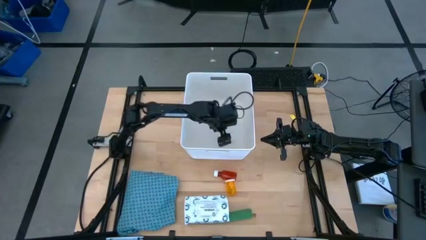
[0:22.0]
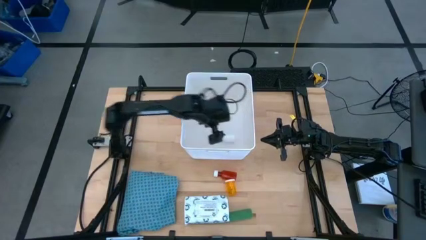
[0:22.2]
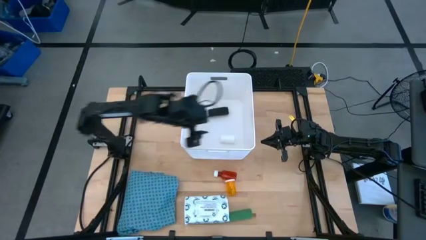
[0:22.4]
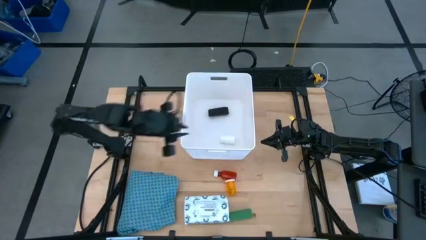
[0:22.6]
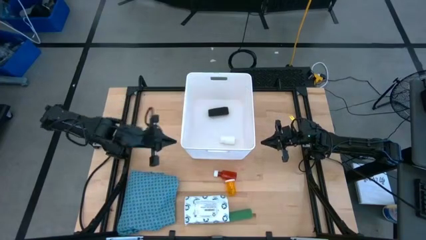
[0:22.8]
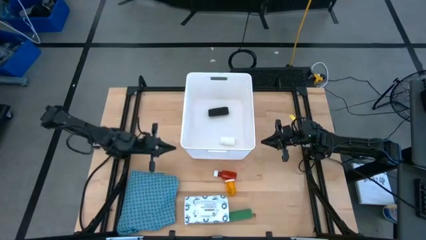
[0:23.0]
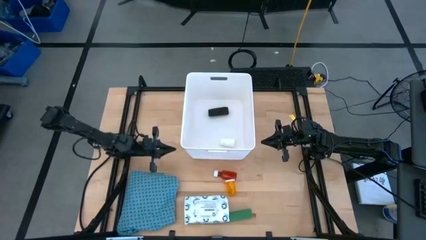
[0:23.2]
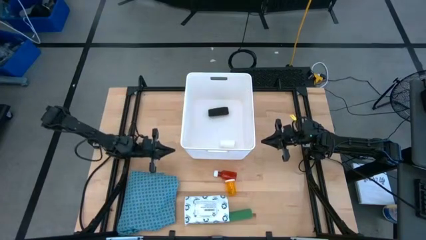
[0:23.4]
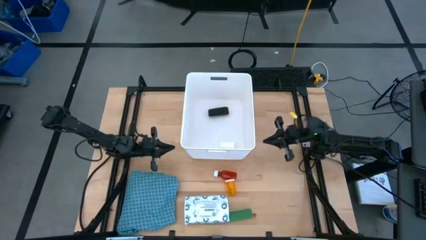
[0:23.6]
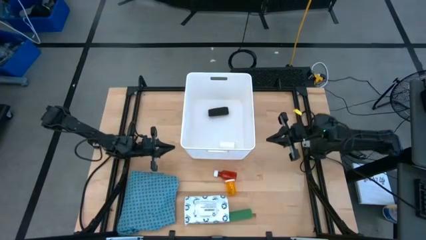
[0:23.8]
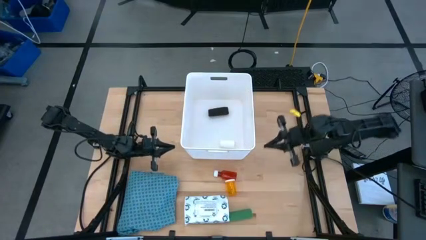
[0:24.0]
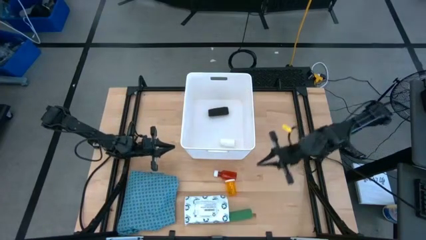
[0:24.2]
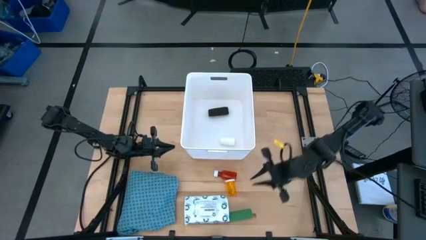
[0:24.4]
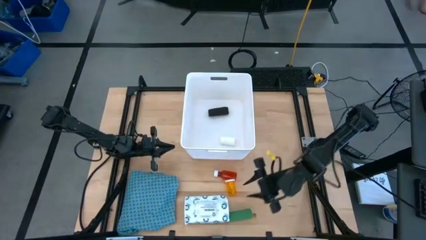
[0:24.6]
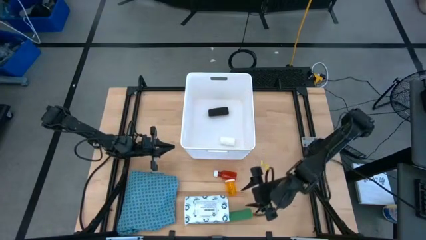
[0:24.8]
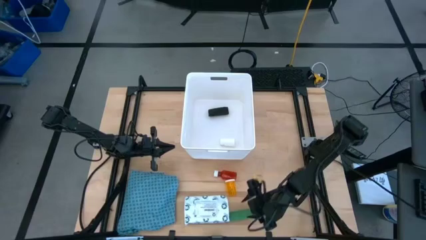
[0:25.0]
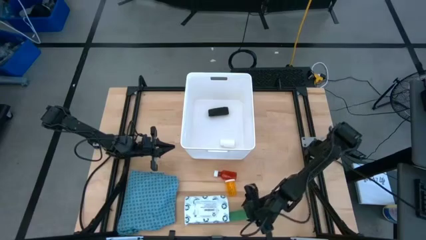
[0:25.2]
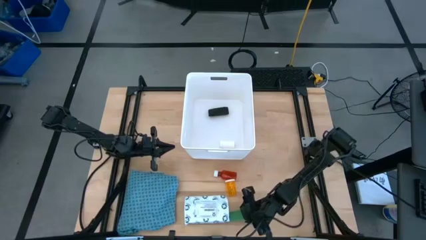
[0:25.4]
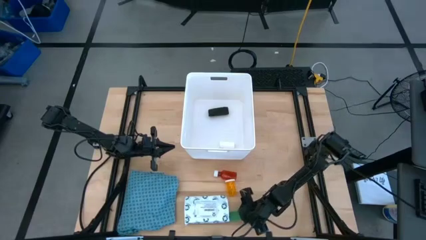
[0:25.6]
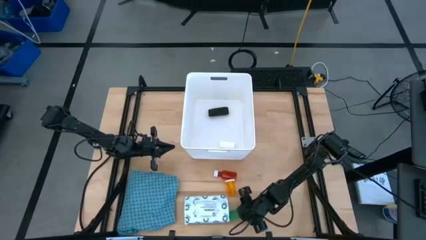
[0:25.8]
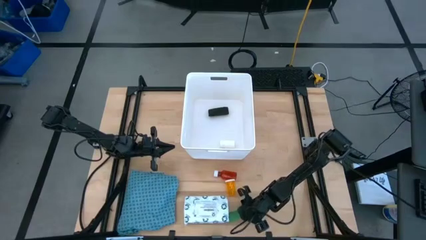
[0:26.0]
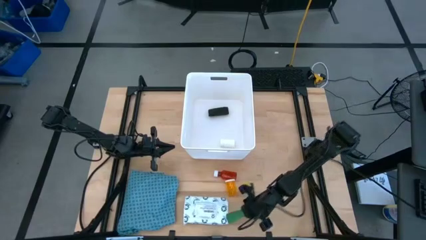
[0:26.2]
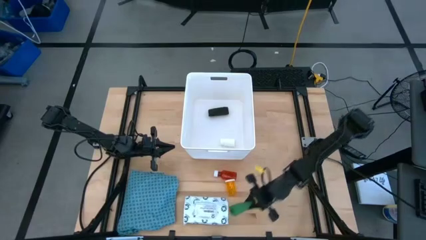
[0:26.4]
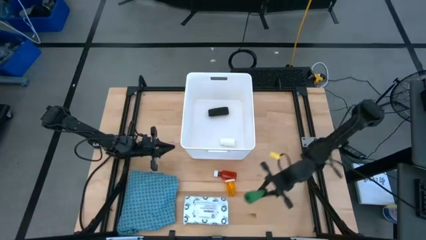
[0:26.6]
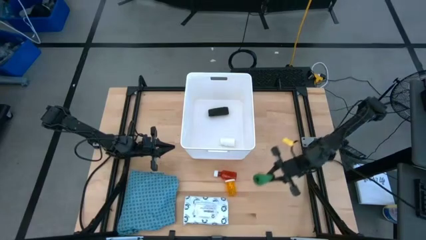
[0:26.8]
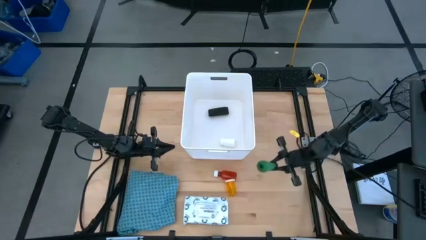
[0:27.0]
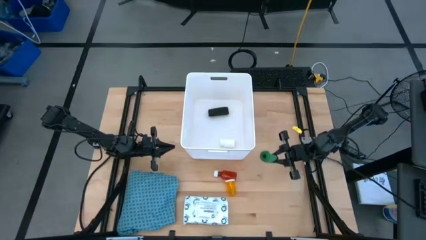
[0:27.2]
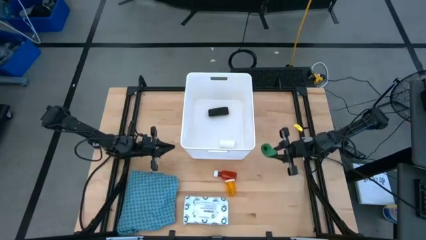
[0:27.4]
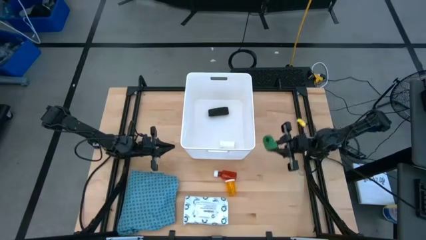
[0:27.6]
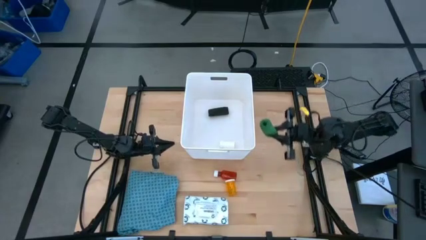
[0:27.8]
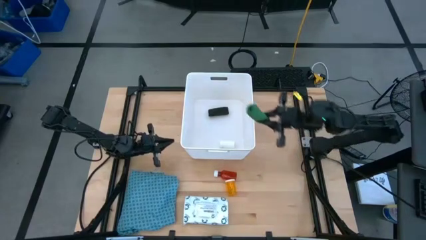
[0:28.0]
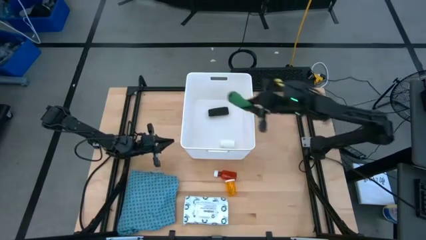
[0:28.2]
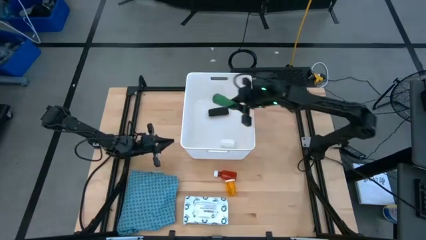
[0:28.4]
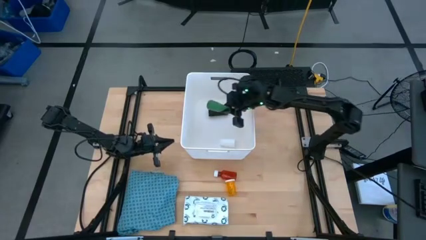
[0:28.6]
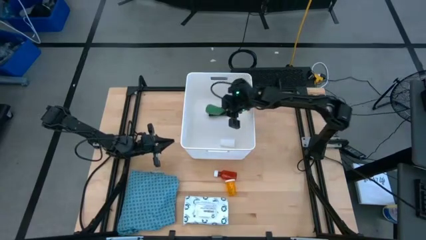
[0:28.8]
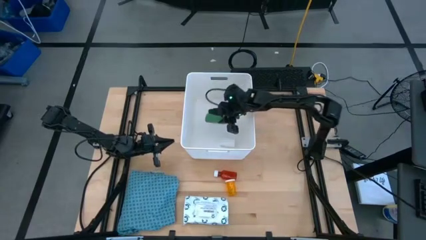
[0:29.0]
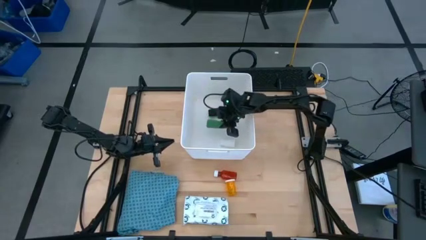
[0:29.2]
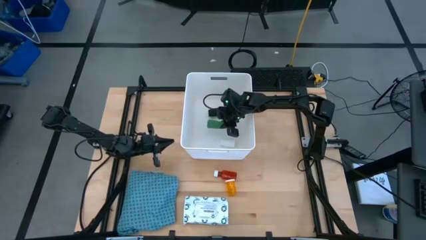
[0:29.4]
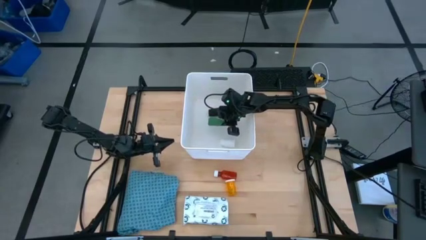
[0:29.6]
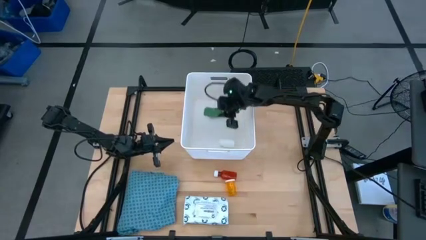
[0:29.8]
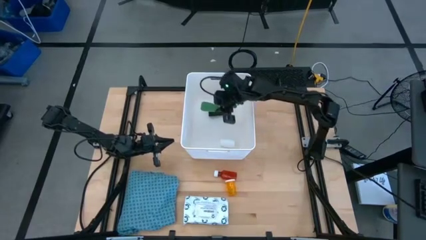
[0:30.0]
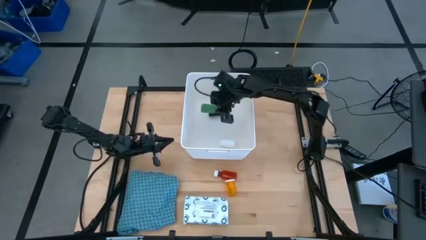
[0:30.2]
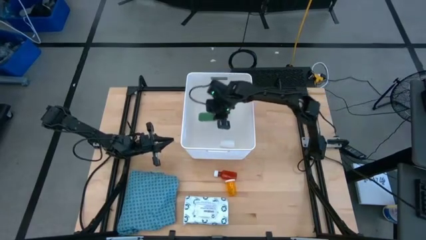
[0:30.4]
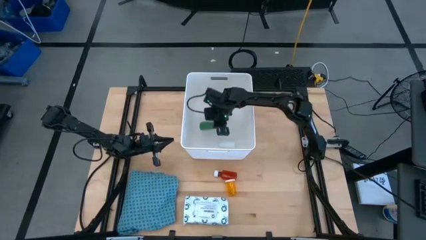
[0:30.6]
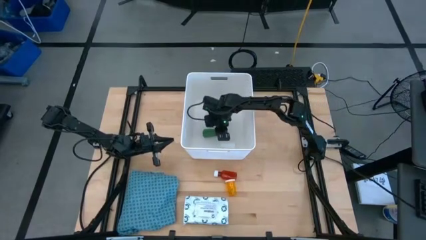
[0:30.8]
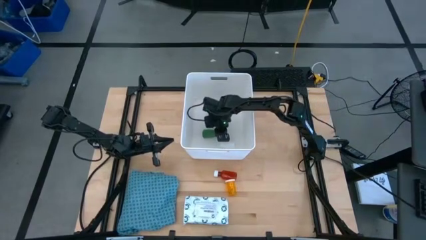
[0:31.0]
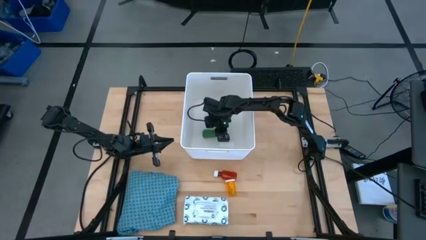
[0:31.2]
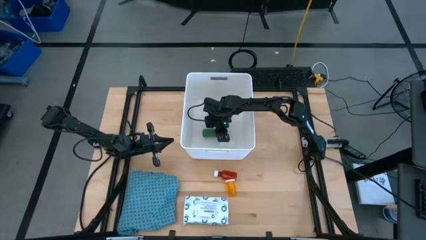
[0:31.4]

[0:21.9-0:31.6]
Task: Pick & place medical supplies in basket/bin
Put the green bandage into the bin

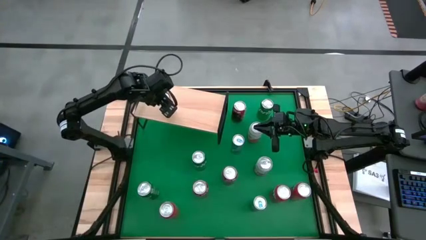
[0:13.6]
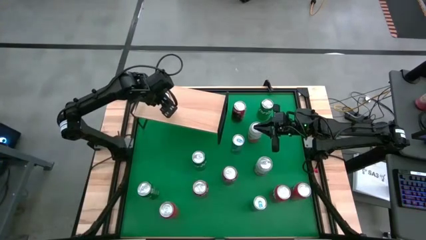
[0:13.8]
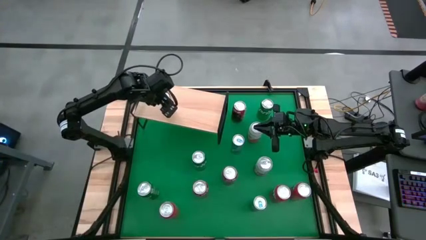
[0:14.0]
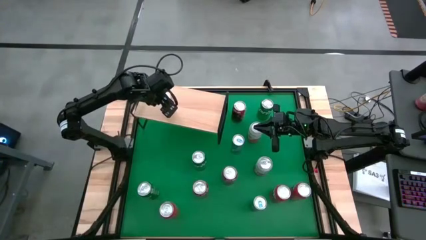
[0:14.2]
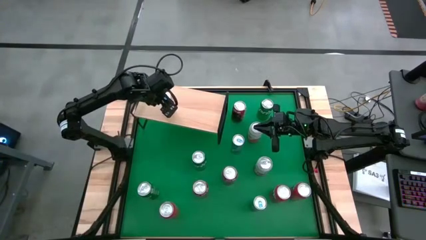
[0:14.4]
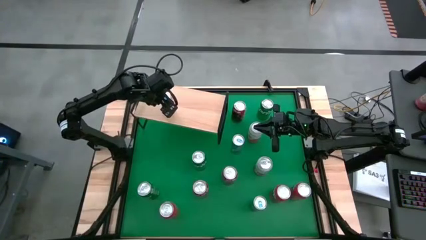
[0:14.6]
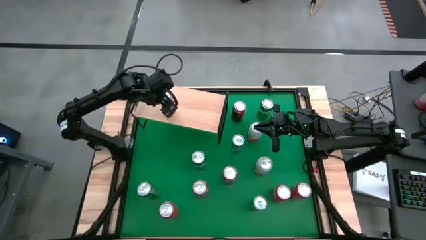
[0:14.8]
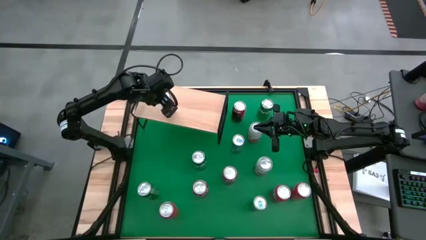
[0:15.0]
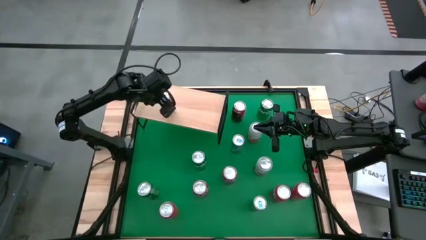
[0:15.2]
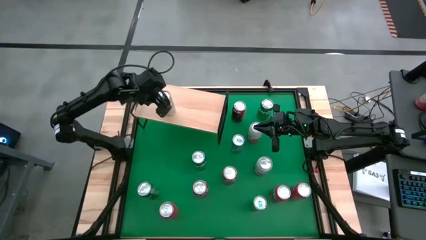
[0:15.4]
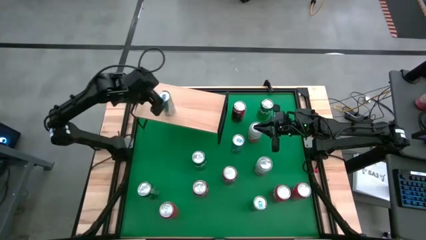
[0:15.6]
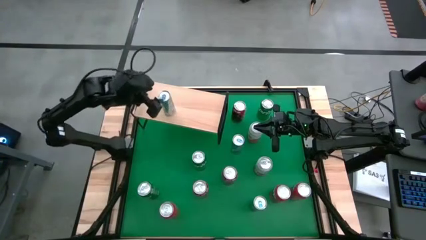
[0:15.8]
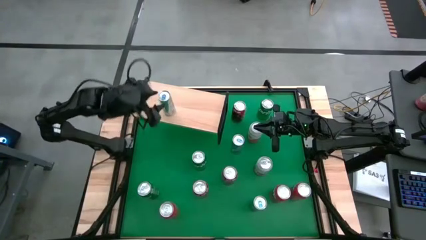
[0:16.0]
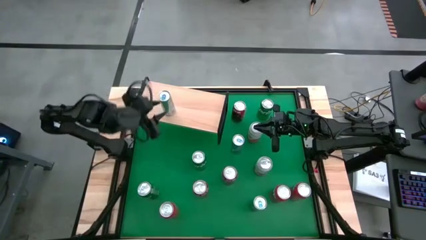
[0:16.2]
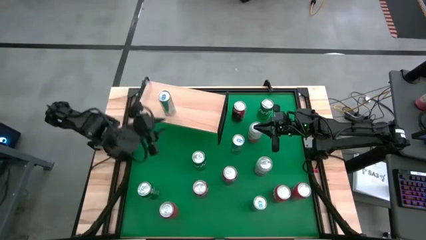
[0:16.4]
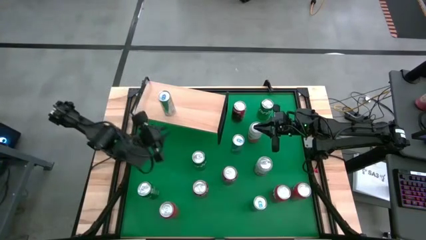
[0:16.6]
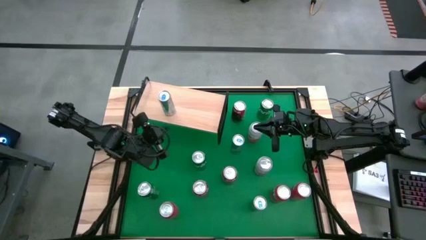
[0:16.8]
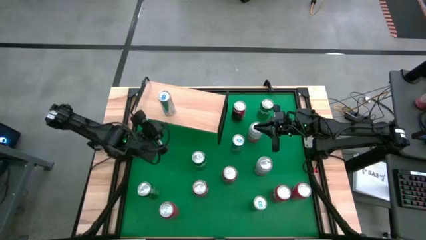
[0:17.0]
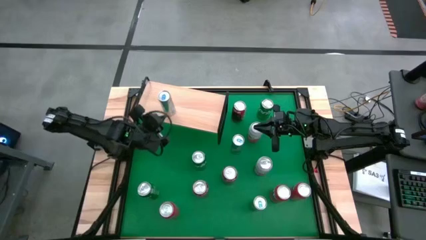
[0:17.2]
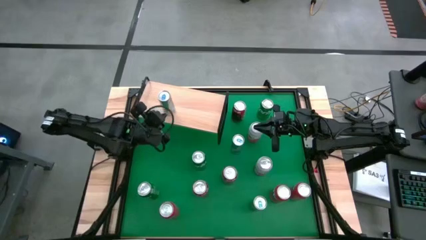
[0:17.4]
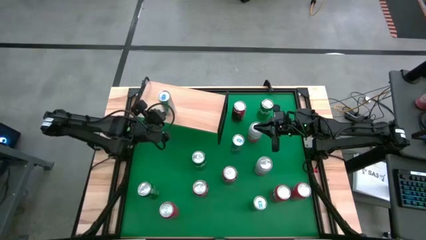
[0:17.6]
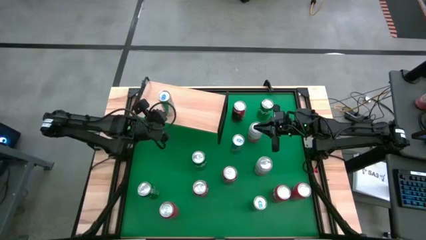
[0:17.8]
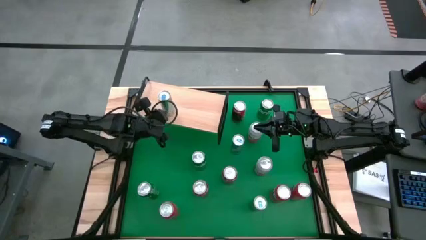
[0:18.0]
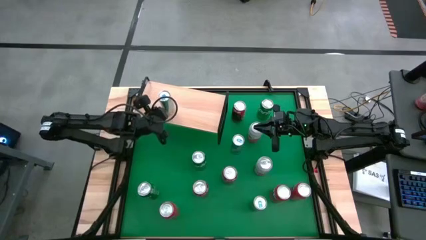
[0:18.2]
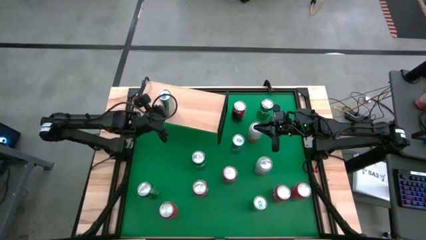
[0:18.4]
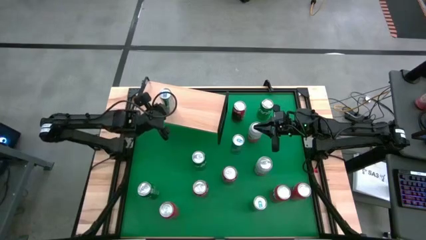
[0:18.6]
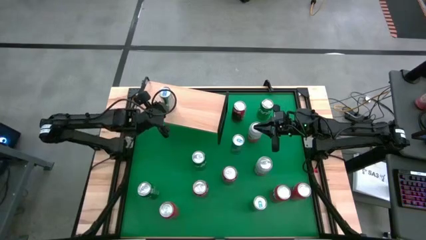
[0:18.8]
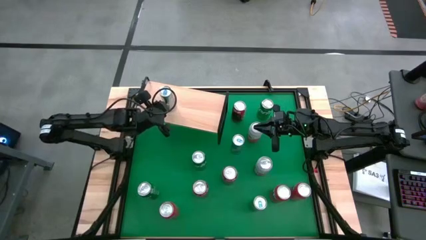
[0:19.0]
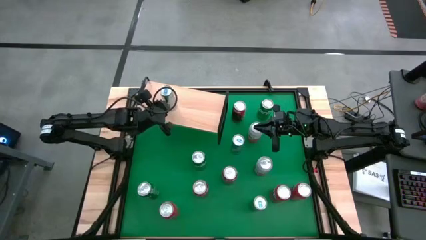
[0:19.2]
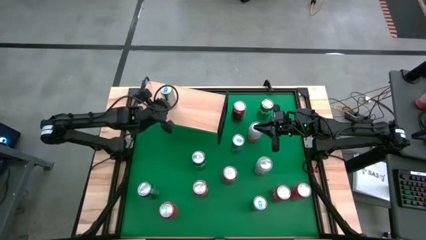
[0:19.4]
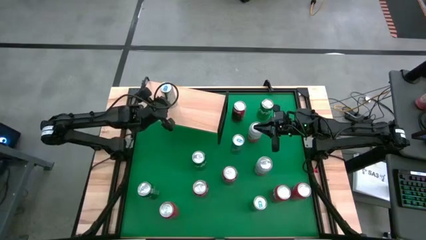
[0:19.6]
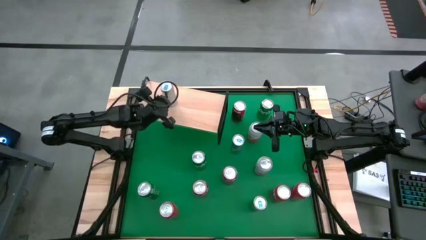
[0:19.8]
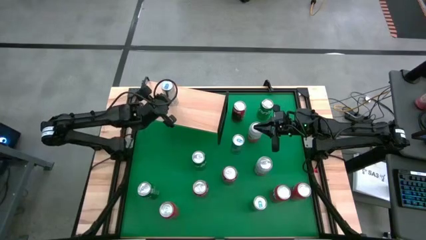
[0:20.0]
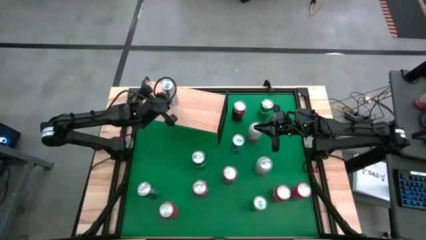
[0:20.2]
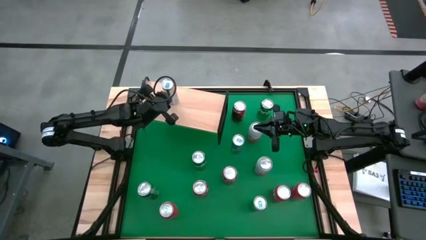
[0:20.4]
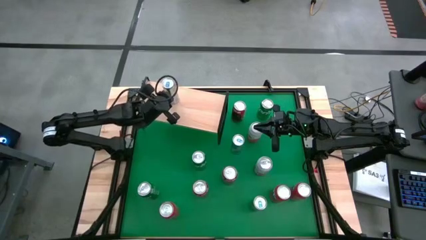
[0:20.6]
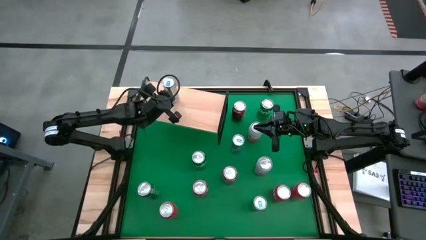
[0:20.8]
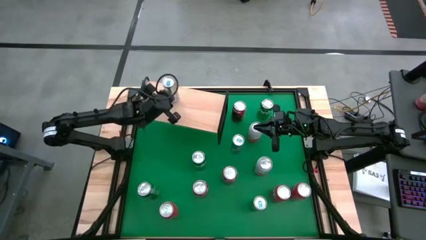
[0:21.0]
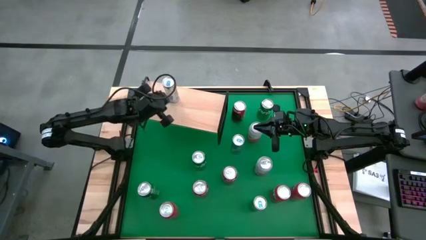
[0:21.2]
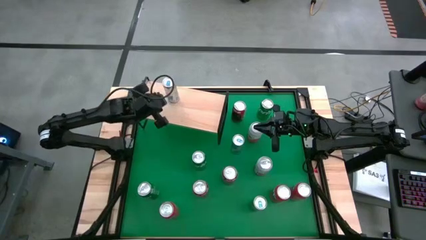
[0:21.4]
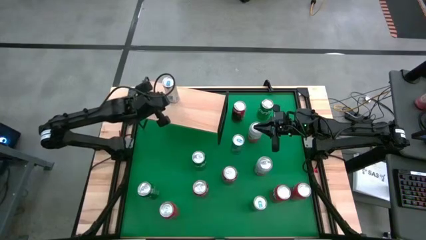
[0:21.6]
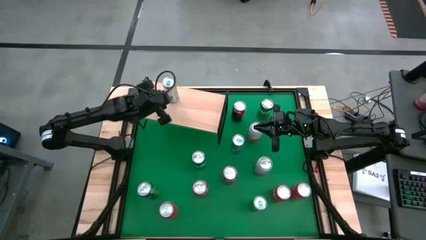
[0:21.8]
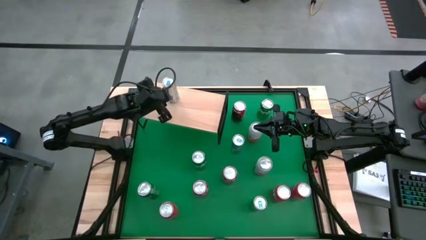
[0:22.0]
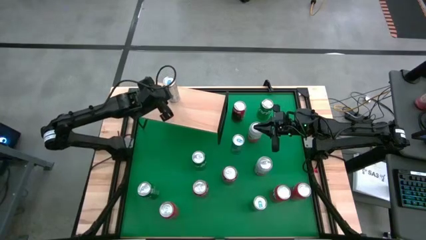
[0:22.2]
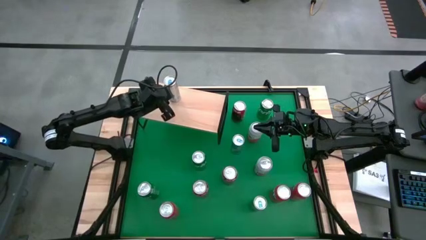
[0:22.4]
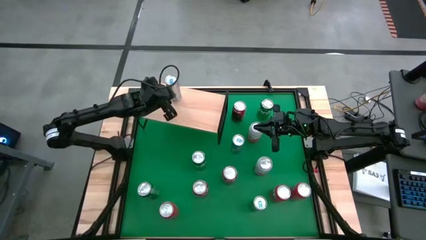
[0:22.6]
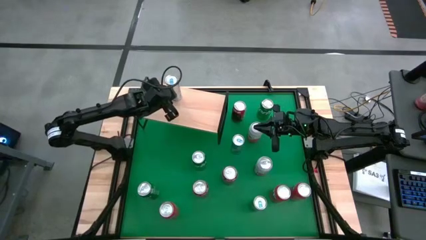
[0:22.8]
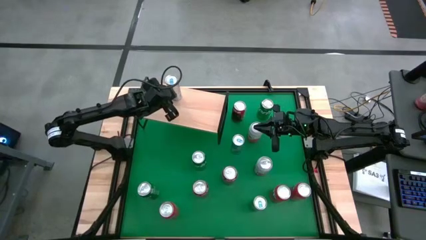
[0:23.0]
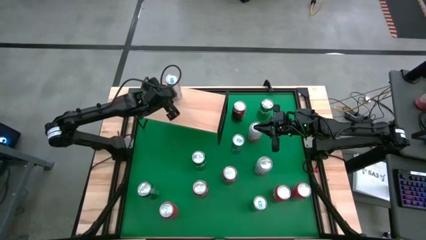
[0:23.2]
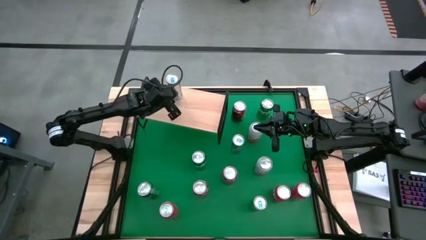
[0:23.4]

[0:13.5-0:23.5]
Task: Place canned beverage on shelf
Put the blue/white soda can on the shelf
